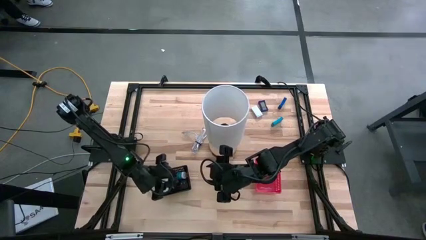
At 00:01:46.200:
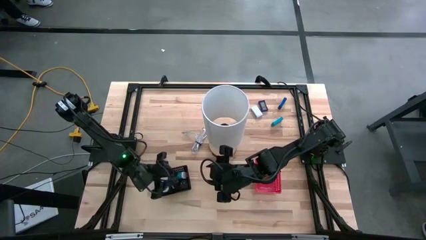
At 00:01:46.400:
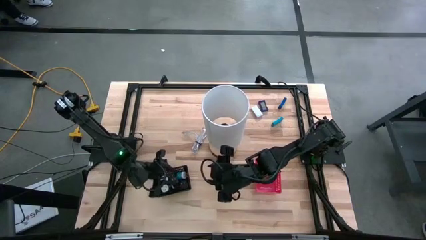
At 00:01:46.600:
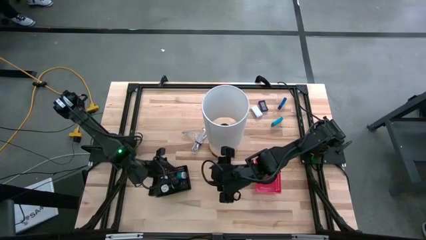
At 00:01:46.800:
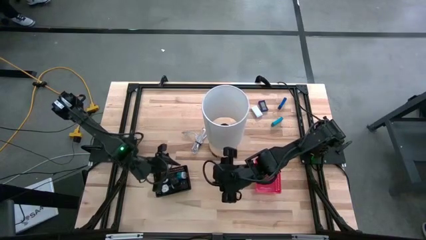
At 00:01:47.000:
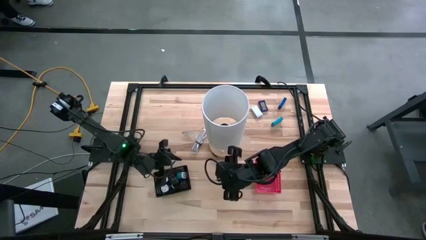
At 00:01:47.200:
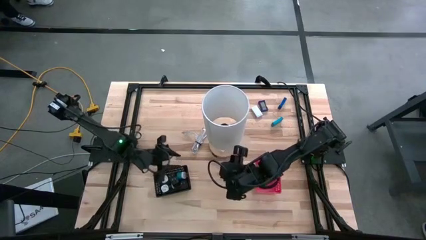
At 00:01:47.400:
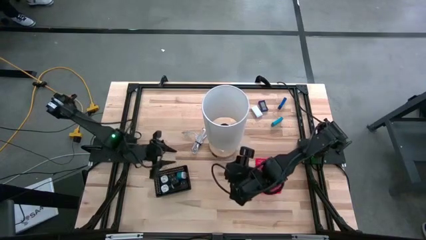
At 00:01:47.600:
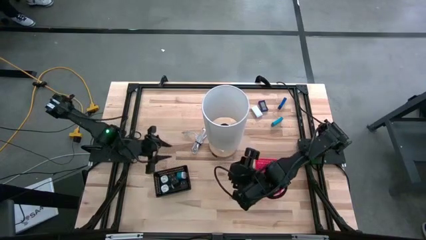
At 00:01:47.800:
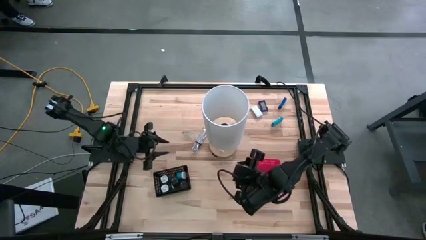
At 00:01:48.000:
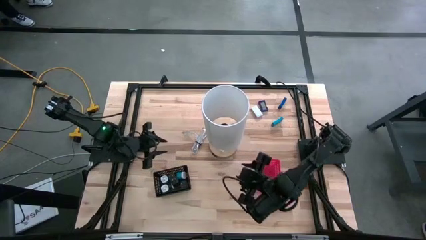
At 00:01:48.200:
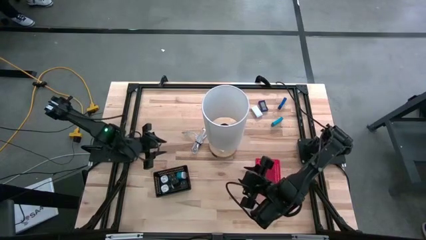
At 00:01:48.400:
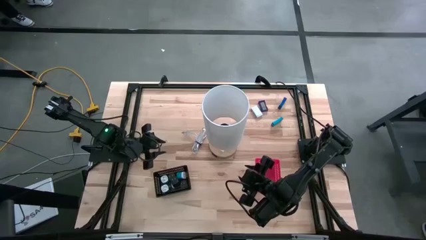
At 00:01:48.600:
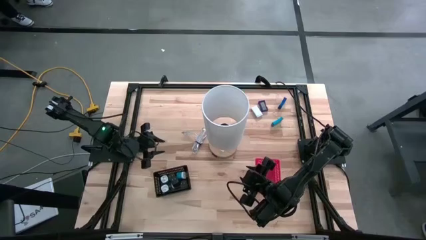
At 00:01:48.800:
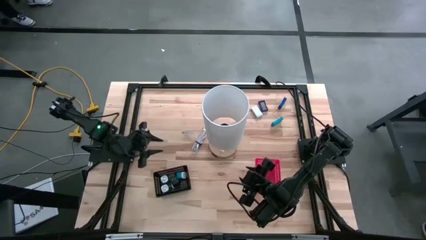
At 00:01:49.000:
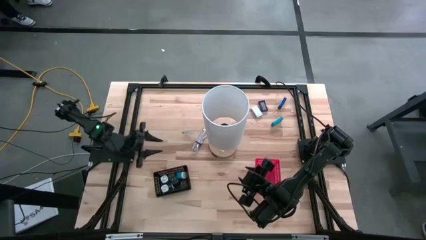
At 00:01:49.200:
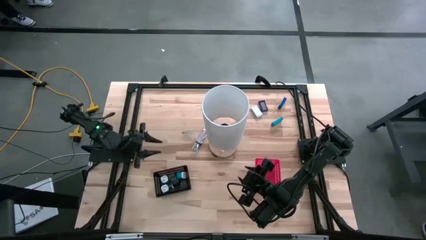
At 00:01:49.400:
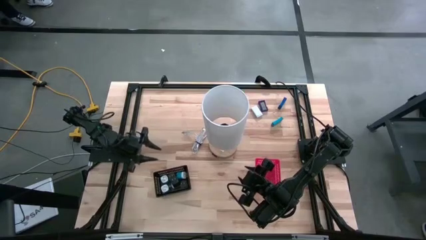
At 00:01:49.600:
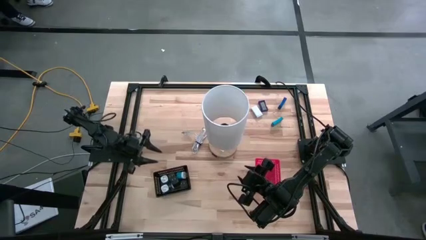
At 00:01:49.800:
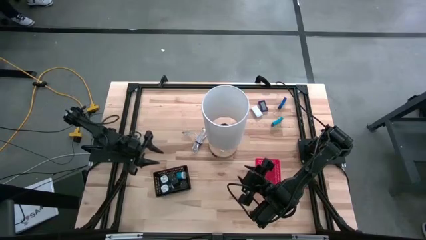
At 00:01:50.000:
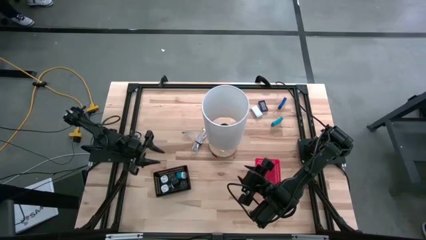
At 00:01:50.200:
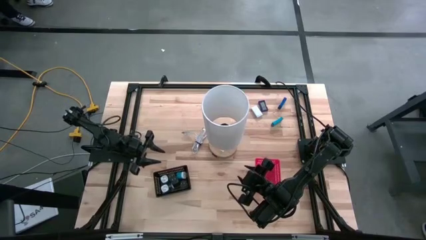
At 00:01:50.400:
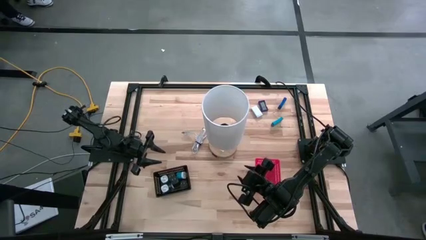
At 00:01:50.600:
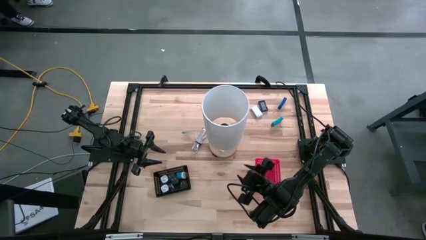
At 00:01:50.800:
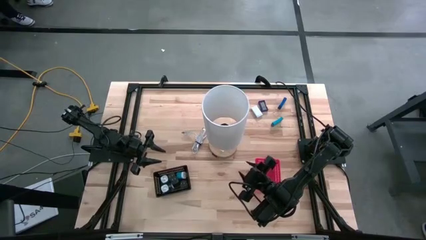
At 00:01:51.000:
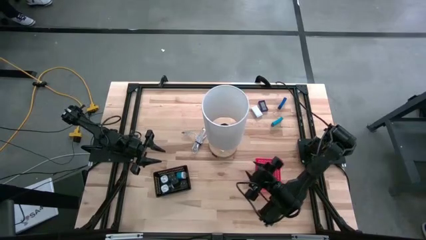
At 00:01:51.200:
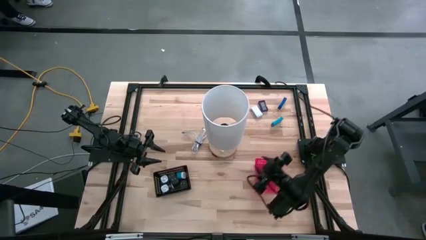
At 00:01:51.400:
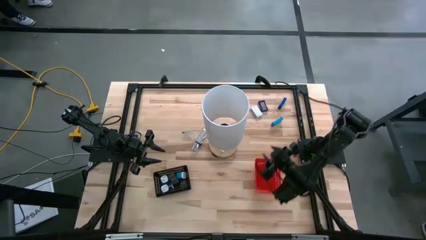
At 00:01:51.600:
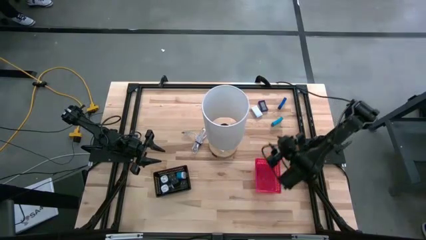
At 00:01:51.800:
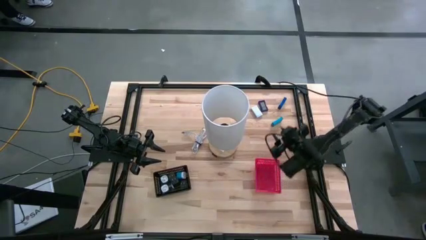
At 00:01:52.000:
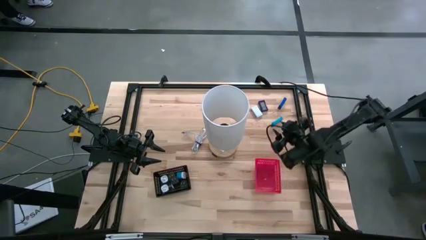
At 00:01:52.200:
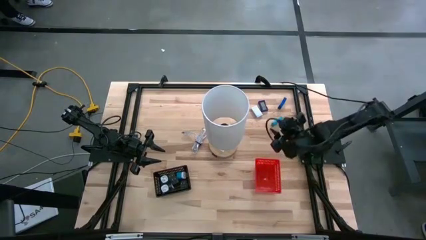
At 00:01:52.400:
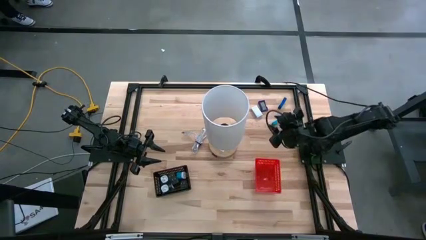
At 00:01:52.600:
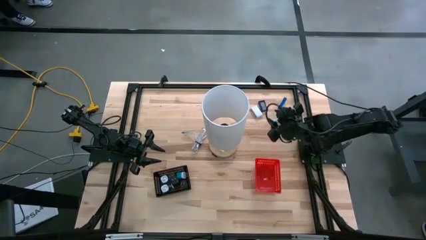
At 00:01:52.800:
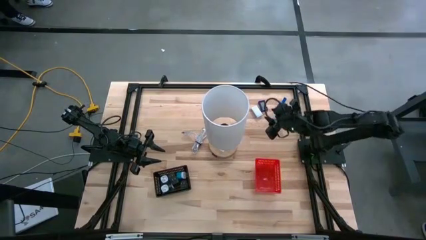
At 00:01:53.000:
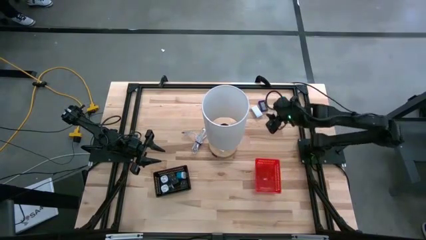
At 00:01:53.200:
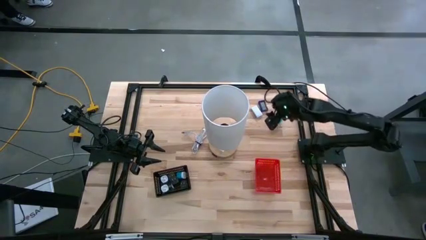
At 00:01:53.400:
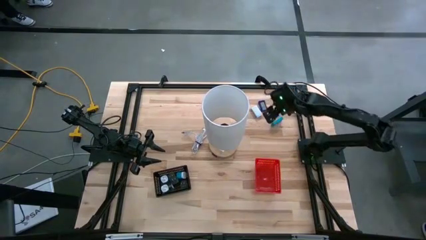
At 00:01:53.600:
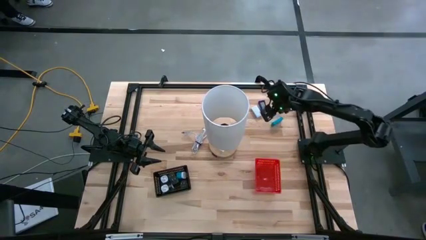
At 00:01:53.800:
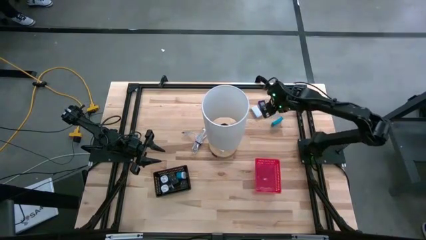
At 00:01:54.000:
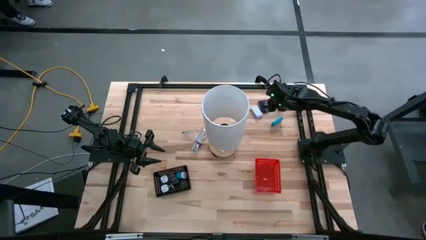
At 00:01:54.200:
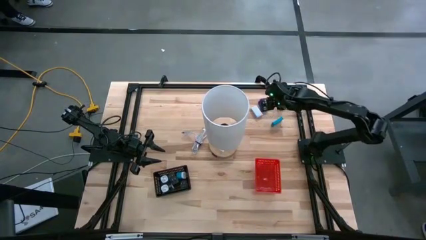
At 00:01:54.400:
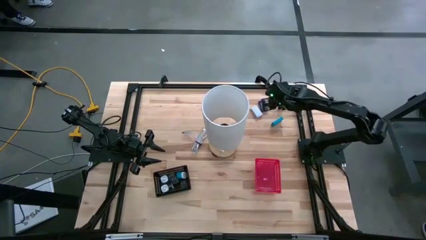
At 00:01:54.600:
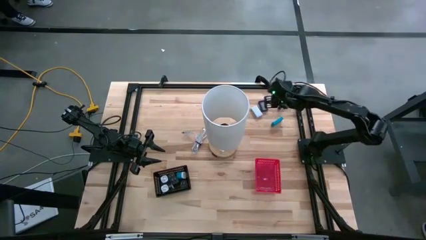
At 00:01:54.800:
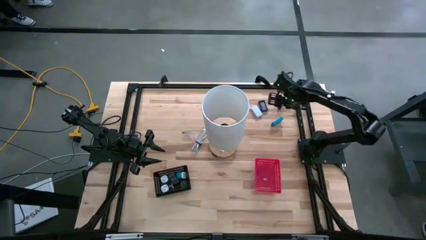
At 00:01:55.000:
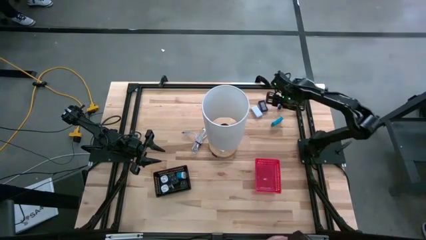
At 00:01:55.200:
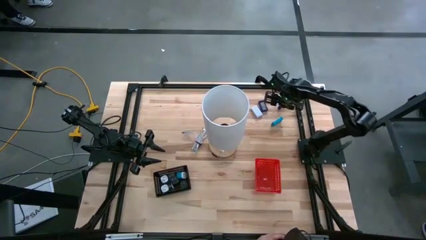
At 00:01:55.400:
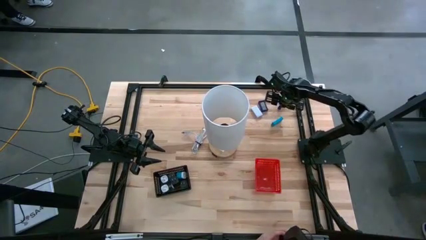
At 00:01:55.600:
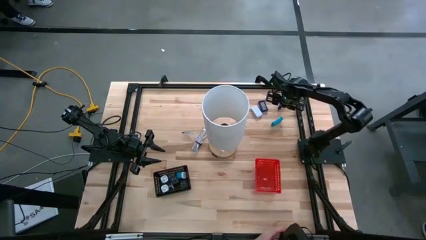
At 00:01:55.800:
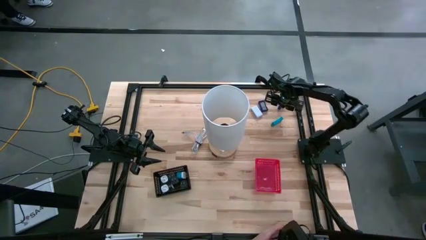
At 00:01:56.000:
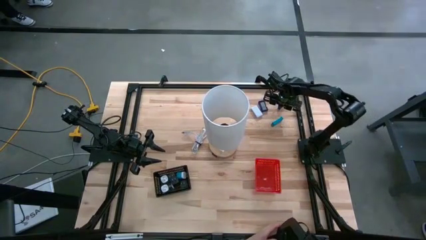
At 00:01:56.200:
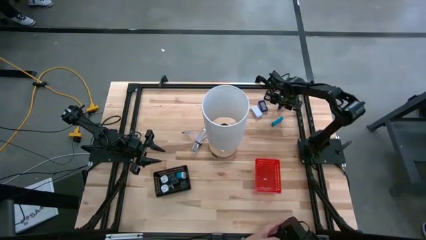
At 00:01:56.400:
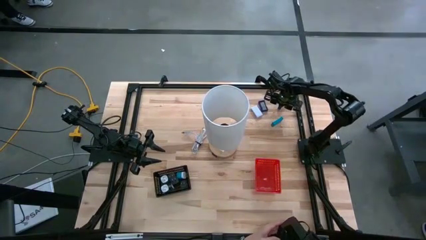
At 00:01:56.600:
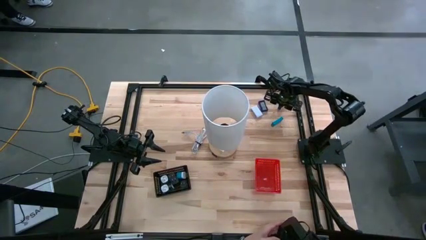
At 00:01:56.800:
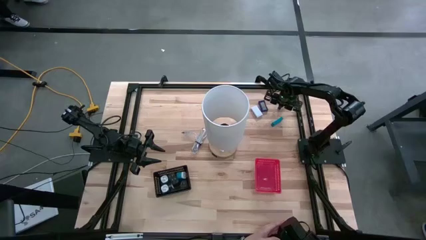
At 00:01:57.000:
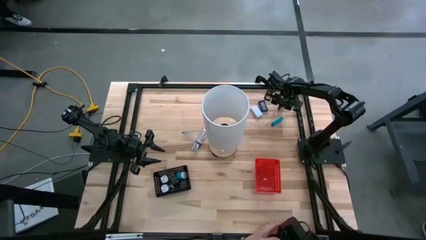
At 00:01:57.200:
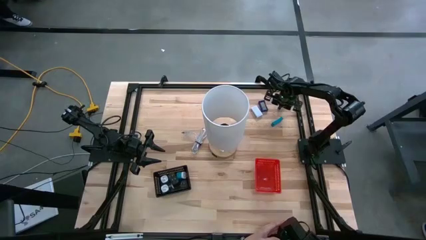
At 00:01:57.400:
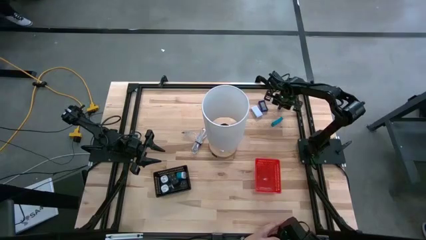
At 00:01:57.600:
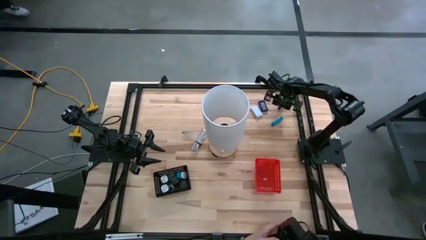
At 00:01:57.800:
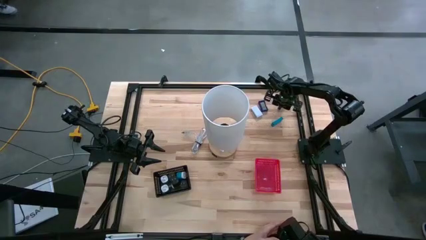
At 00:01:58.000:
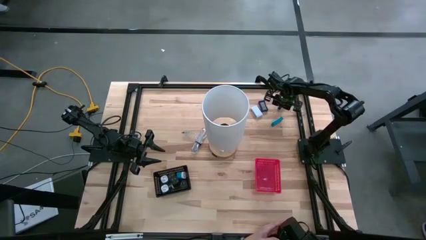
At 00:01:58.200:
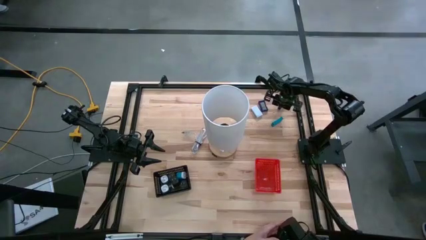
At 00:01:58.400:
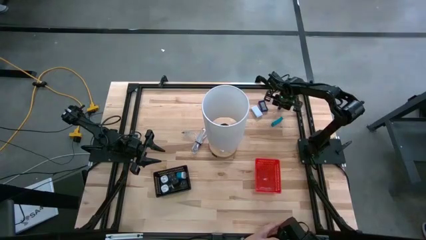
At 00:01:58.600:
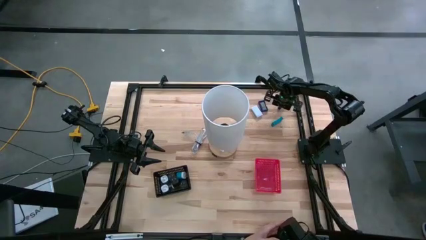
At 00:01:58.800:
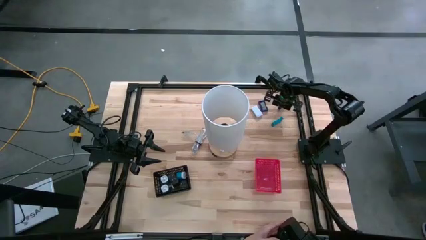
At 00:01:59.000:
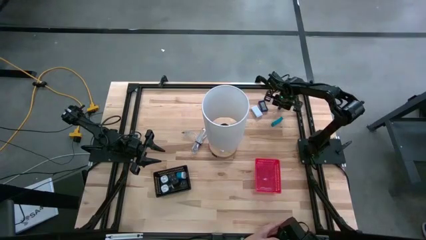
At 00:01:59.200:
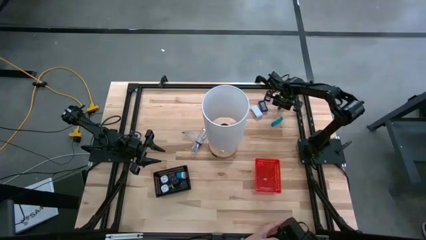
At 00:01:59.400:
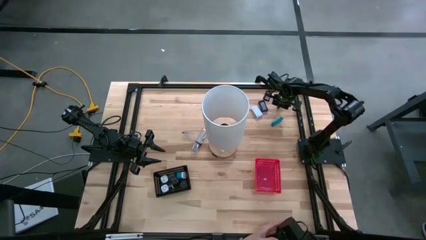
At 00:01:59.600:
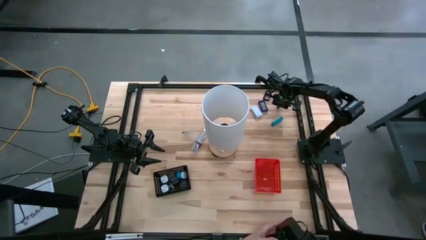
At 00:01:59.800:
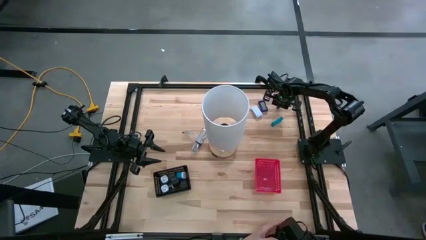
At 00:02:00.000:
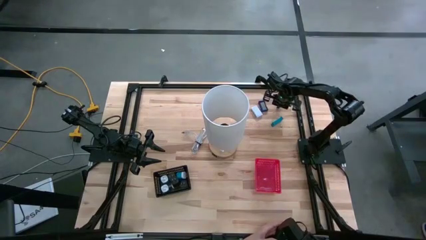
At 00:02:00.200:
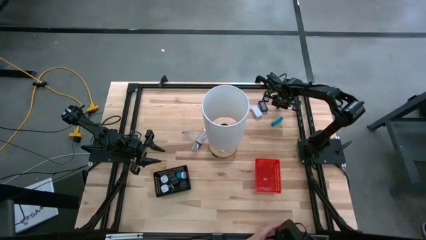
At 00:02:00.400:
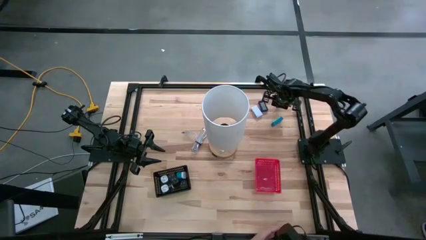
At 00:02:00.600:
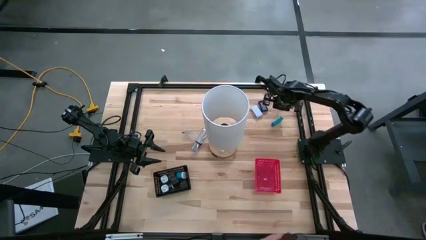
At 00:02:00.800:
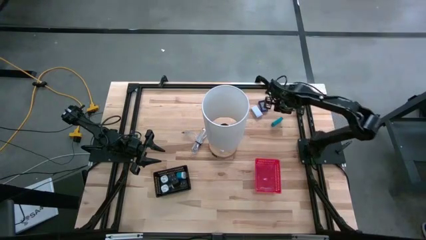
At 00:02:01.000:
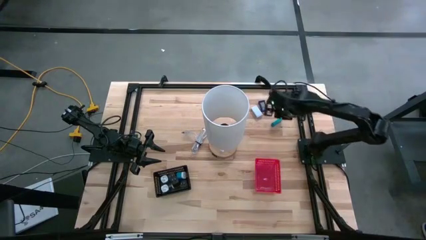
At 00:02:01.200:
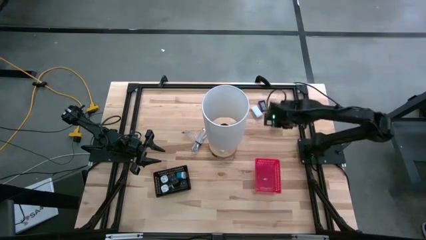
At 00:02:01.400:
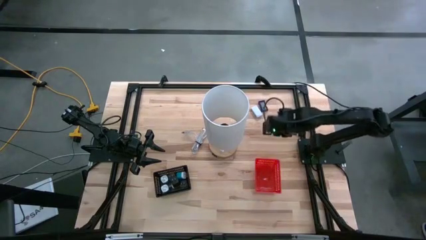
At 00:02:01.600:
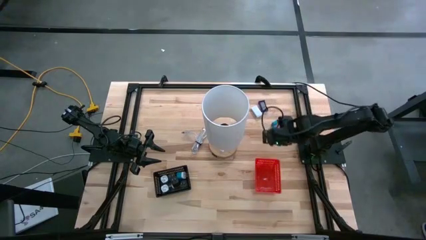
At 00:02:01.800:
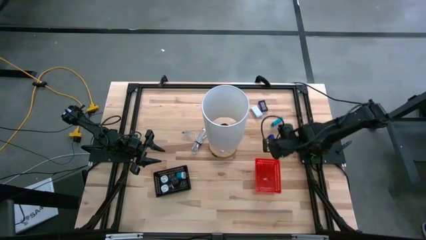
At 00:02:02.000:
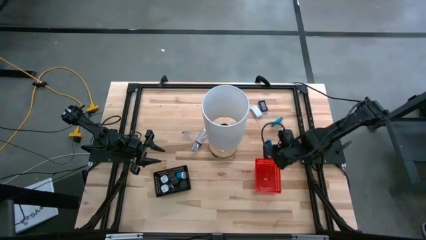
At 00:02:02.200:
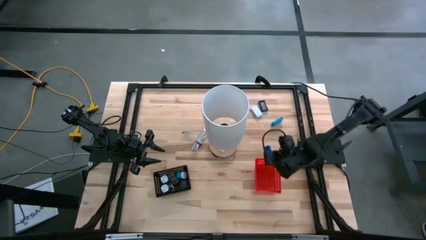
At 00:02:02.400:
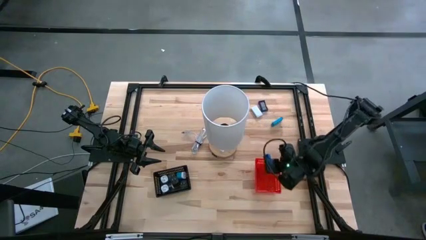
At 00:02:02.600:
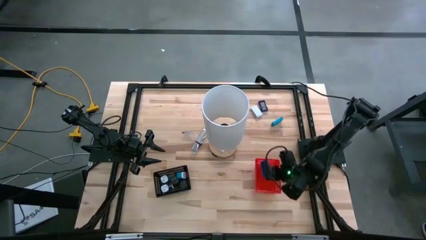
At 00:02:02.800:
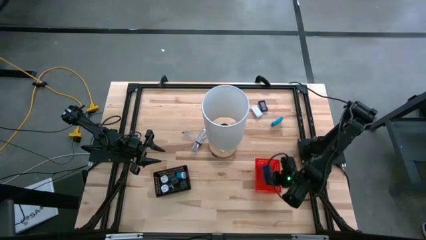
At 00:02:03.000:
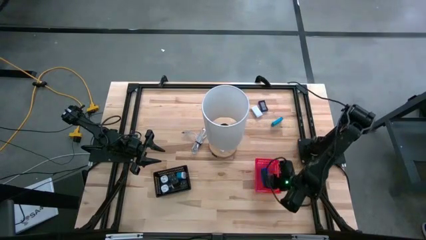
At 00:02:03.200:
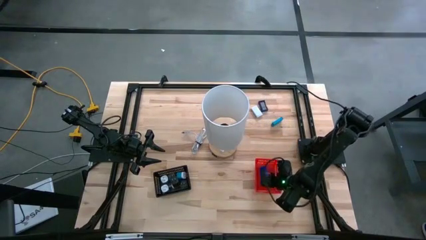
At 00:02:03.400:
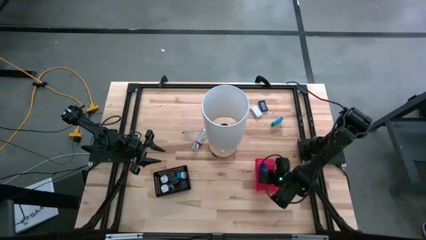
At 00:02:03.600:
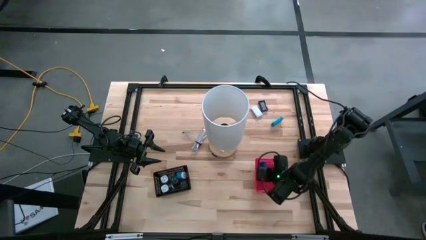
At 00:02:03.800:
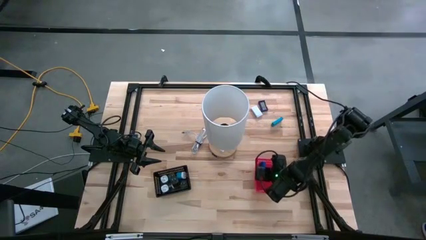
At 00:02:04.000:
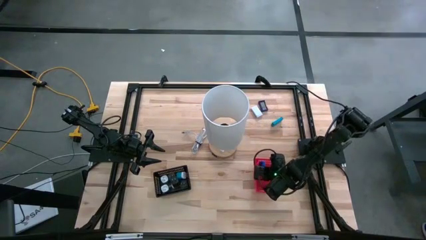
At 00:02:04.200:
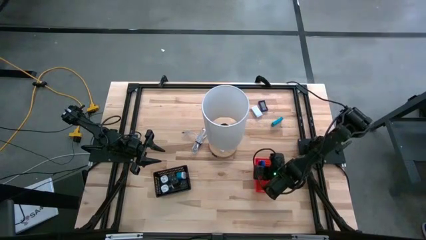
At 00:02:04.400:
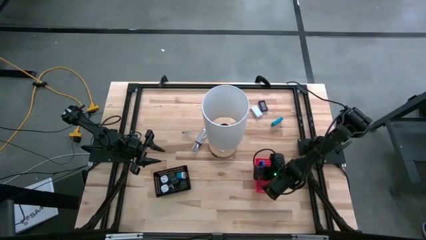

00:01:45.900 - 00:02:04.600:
Task: Pick & Place Office items
Put the right blue digital clock into the orange bin
